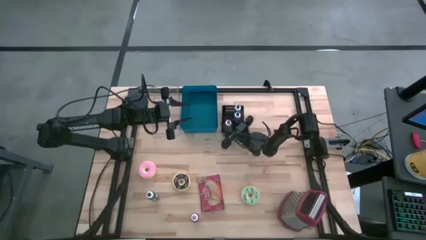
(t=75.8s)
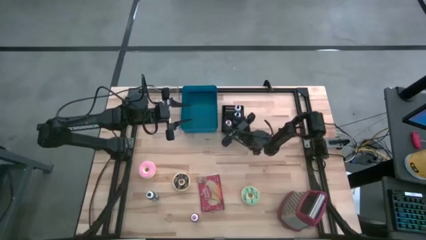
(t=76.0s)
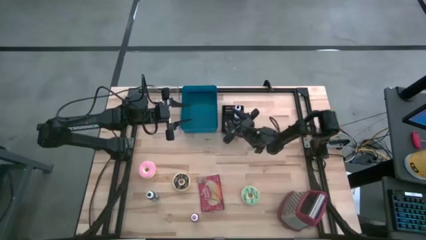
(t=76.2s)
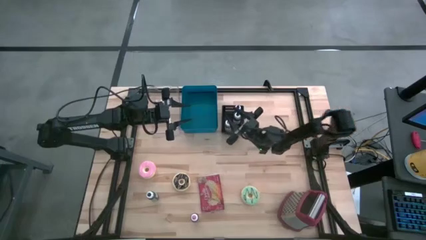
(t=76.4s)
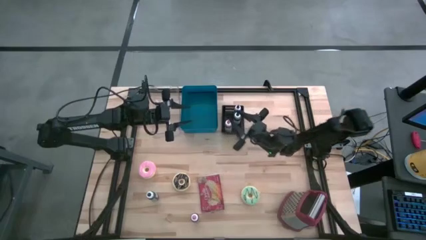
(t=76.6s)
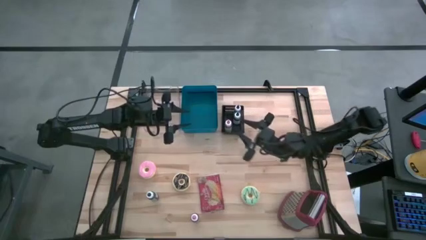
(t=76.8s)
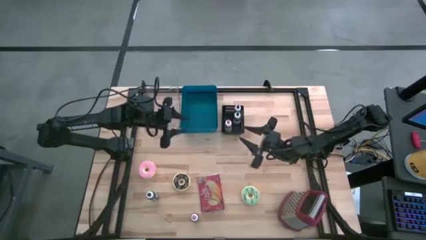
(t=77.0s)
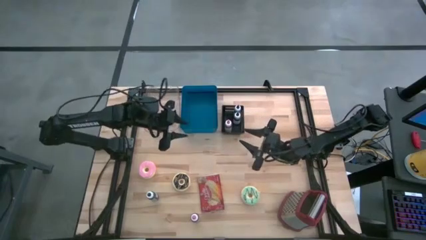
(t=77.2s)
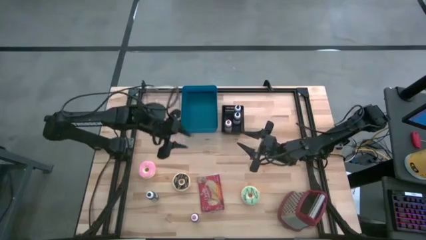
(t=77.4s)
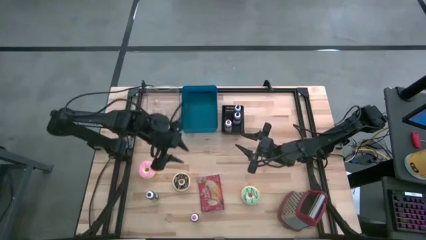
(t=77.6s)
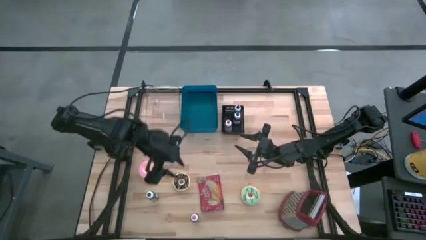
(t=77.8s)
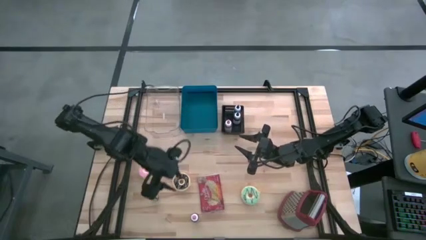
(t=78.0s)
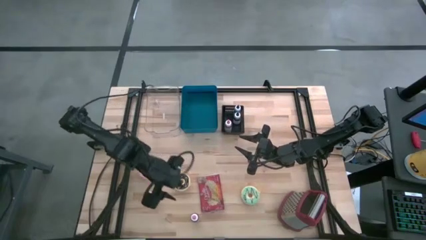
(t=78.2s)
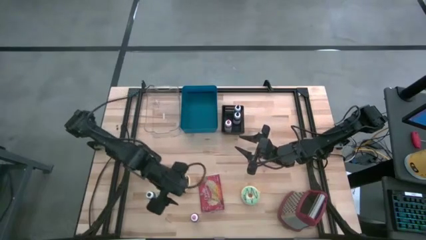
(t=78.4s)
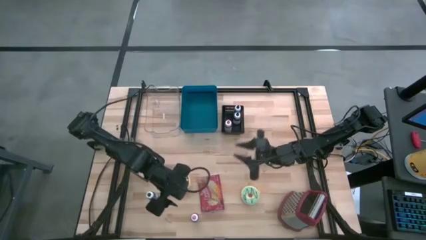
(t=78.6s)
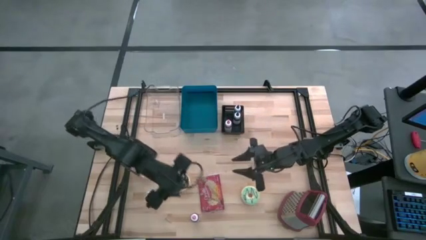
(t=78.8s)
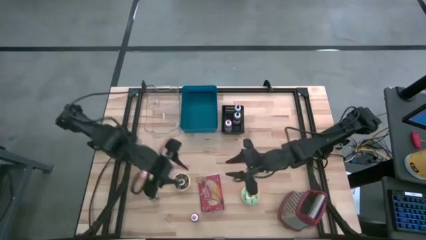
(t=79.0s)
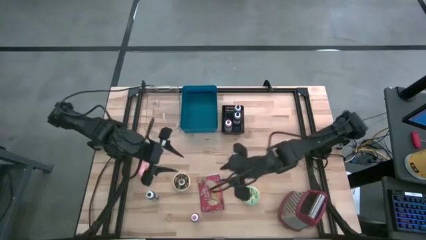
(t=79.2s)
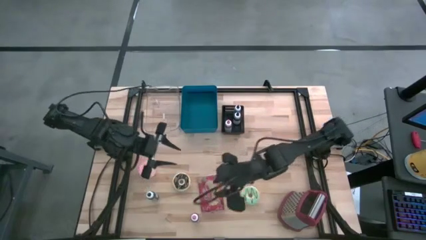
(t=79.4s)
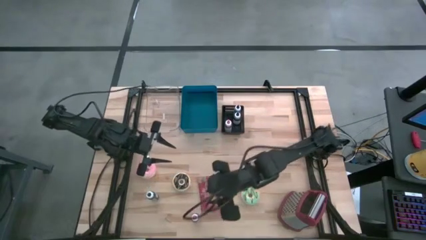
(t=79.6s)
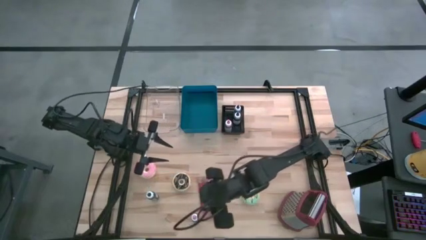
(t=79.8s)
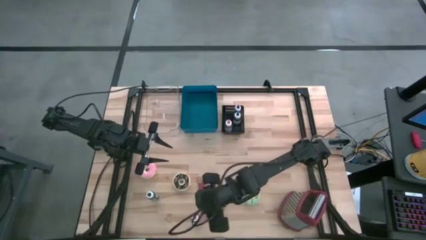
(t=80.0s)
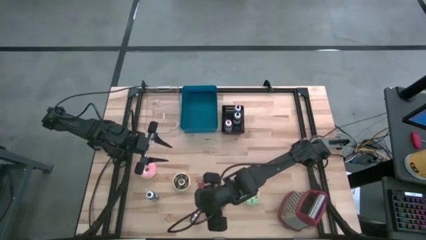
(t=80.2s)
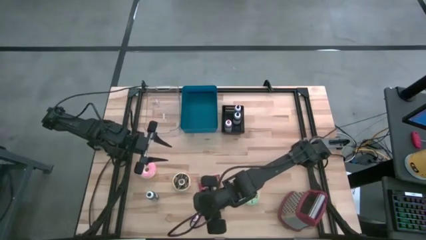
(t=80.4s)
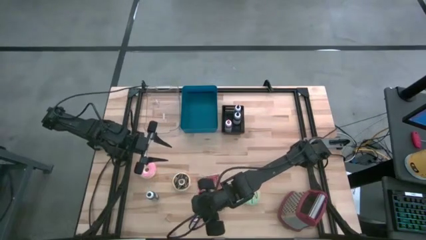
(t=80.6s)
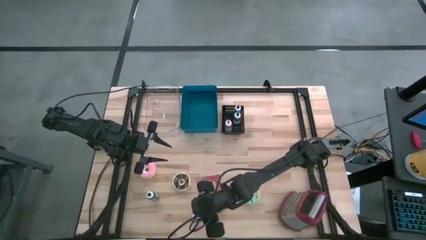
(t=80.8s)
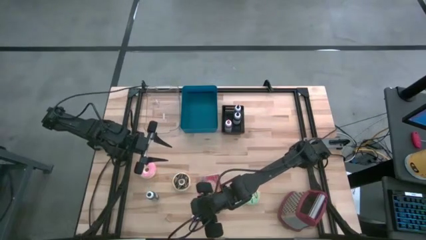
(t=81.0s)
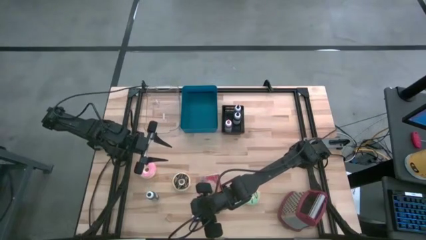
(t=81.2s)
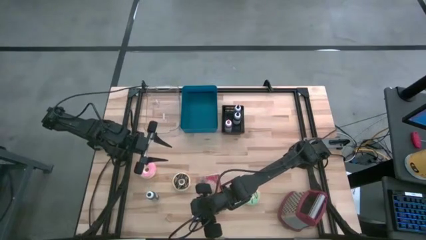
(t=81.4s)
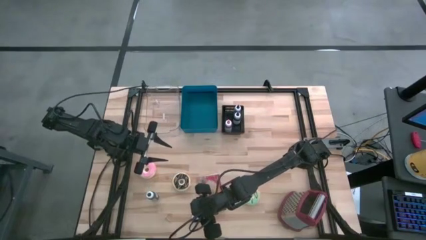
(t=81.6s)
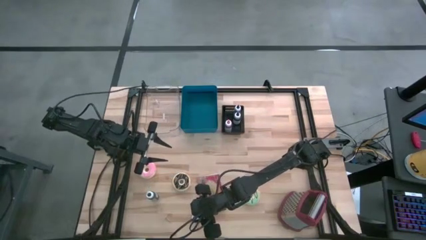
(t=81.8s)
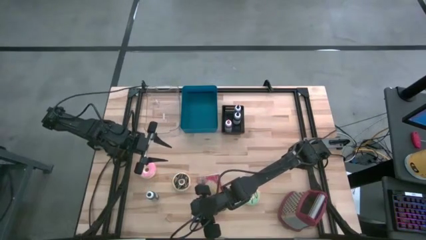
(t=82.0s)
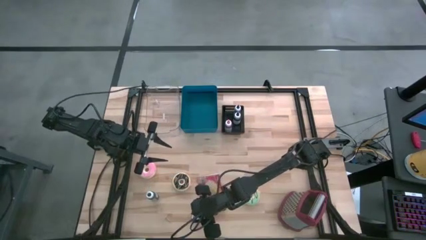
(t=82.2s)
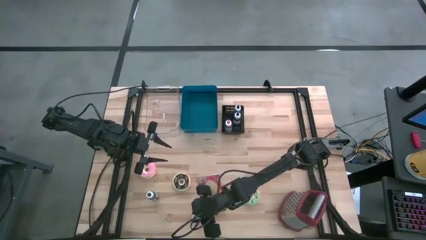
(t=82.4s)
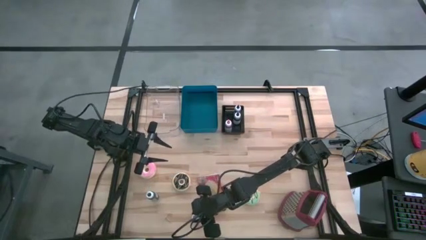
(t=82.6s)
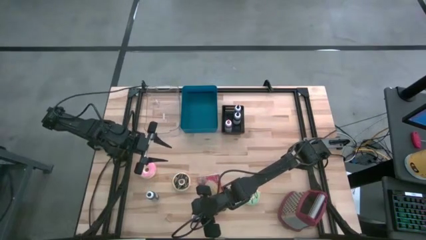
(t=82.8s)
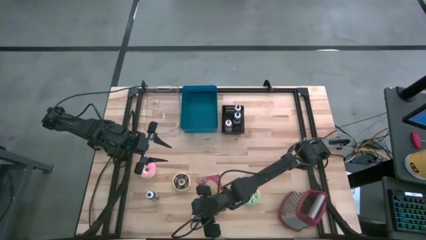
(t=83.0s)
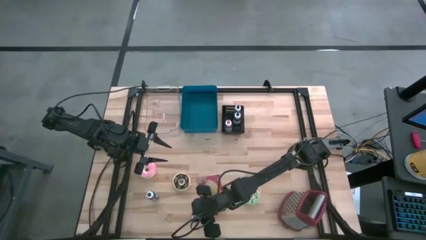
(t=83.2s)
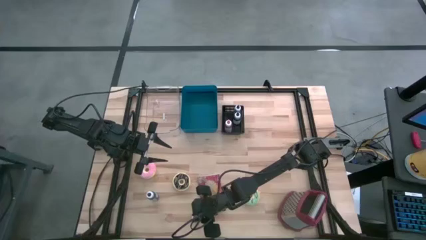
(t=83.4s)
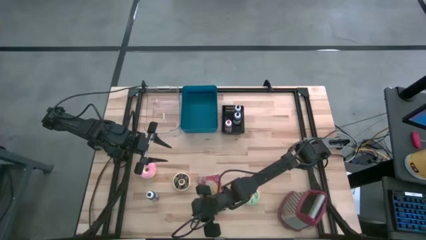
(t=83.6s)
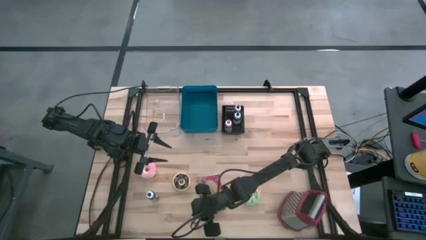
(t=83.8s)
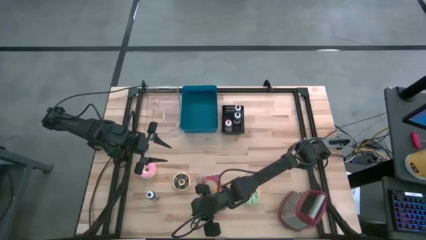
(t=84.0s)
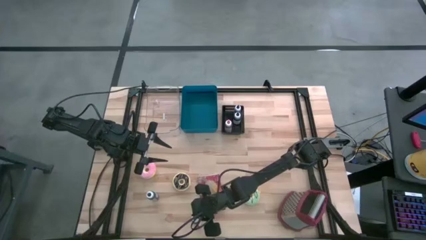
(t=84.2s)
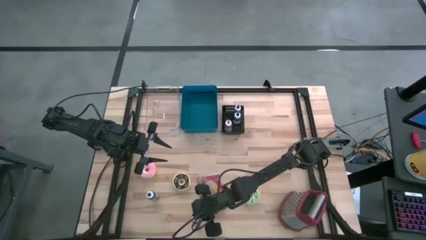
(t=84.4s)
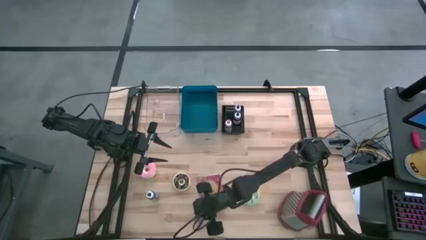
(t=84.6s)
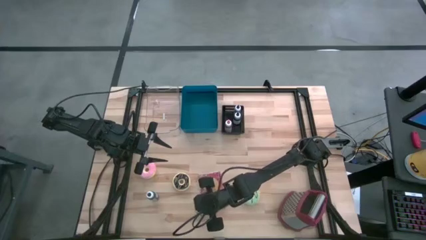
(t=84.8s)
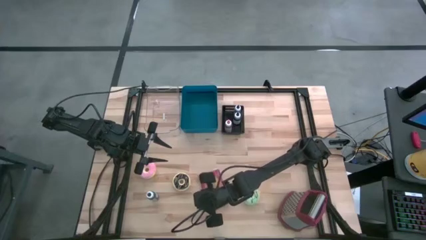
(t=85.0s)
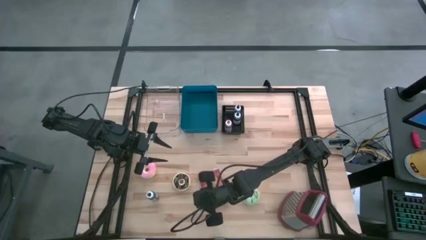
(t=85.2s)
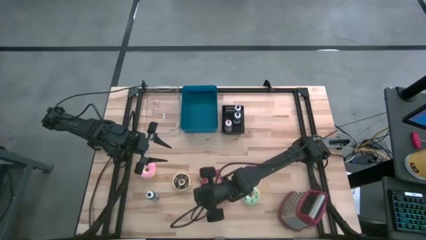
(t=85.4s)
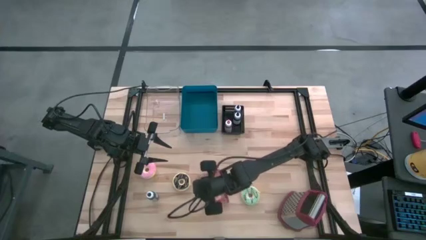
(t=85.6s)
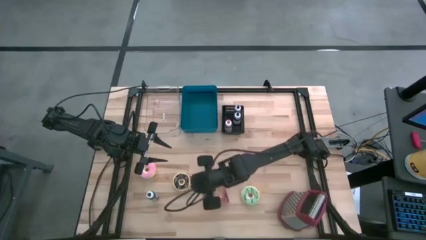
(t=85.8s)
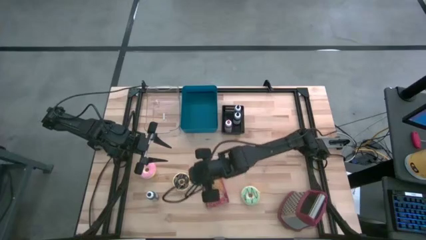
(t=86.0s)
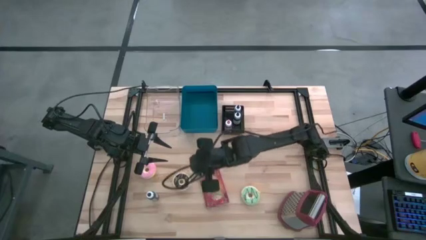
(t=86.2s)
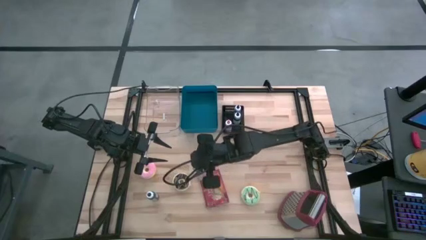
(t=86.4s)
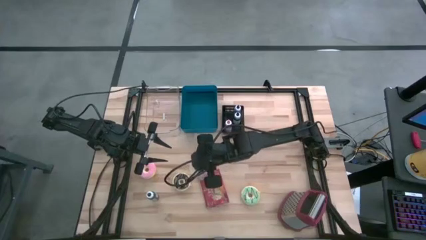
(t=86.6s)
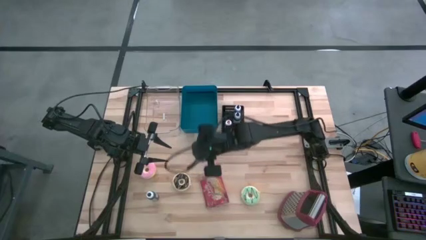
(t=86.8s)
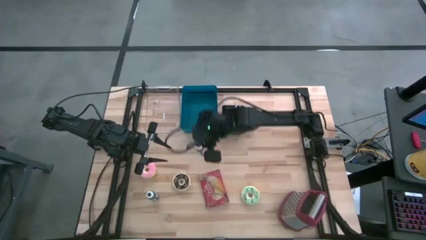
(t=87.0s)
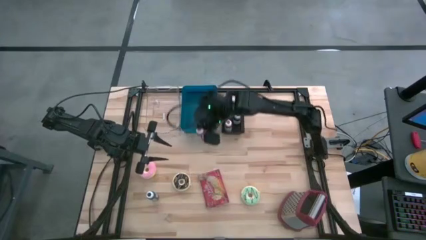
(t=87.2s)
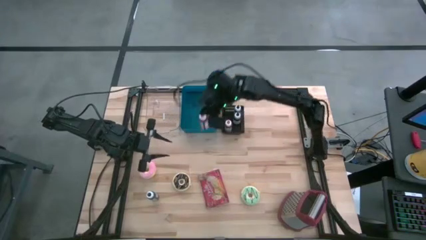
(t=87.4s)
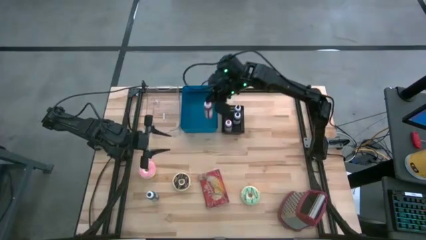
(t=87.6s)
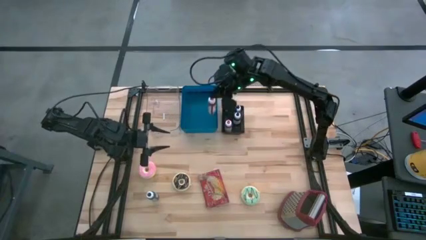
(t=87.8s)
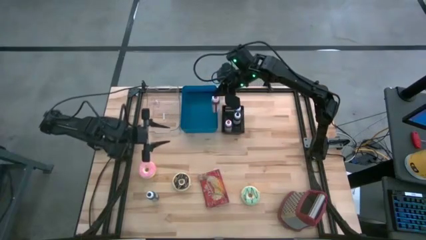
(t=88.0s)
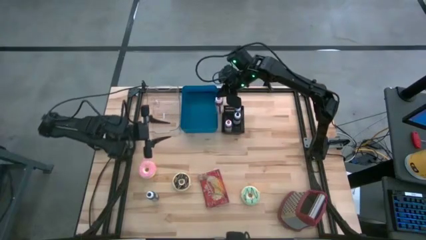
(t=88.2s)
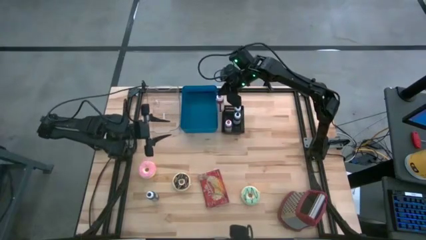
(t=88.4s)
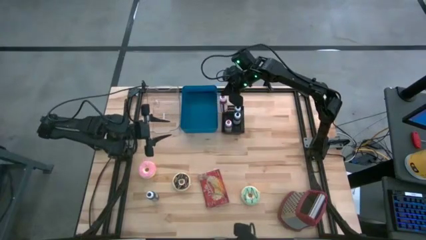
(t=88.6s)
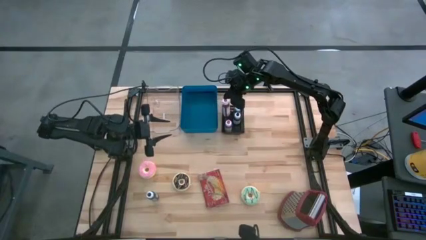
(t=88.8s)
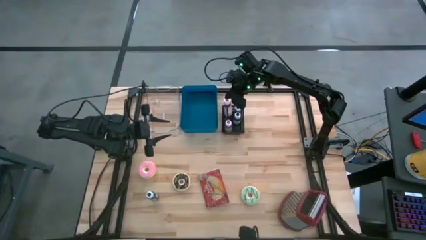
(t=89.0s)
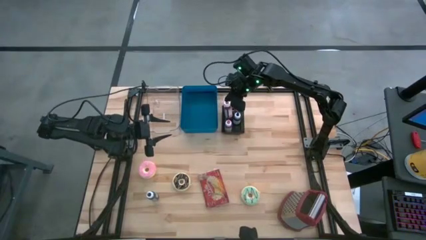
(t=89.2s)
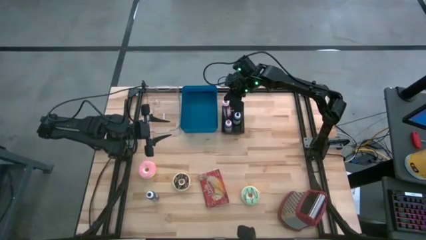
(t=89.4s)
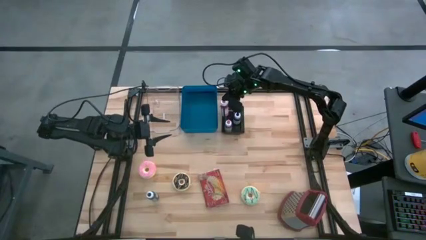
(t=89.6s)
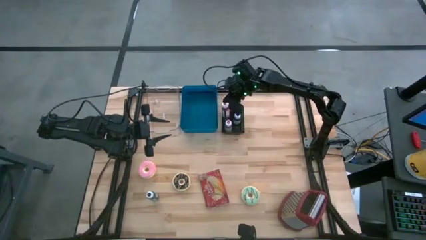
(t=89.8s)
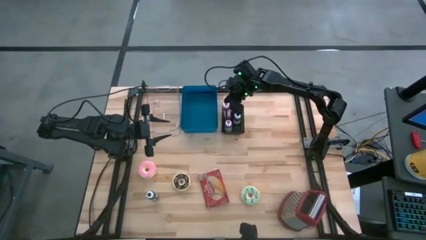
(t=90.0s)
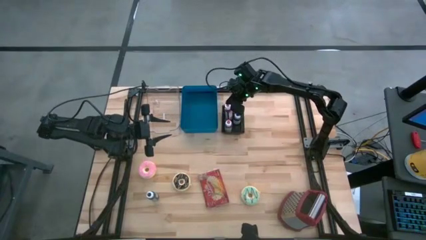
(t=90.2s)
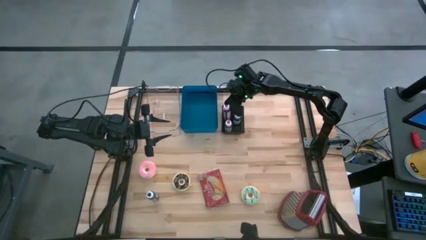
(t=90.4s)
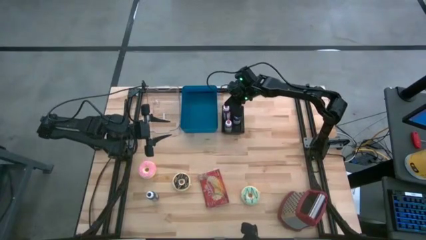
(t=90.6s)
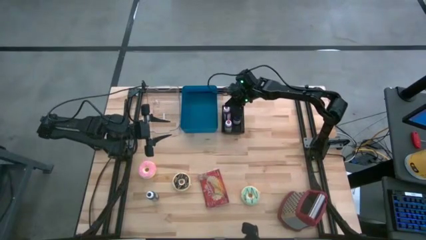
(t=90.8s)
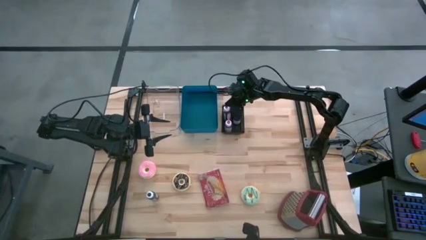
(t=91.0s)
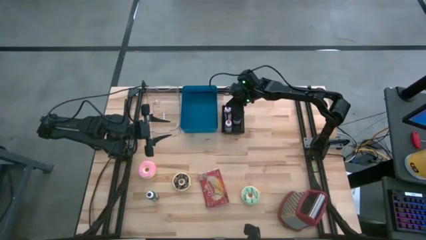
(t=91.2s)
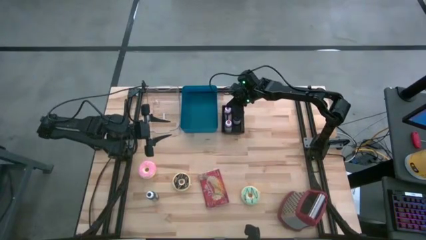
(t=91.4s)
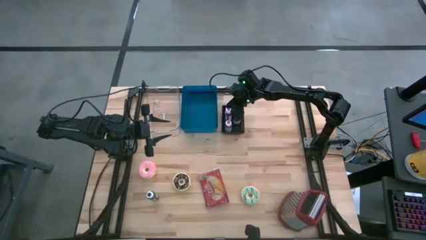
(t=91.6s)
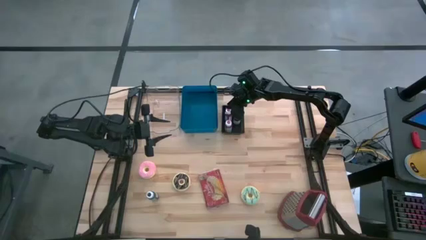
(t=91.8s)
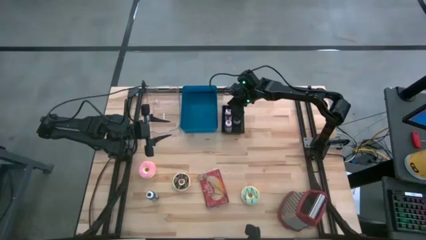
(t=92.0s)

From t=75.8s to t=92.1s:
Put the pink food coloring into the black bin
